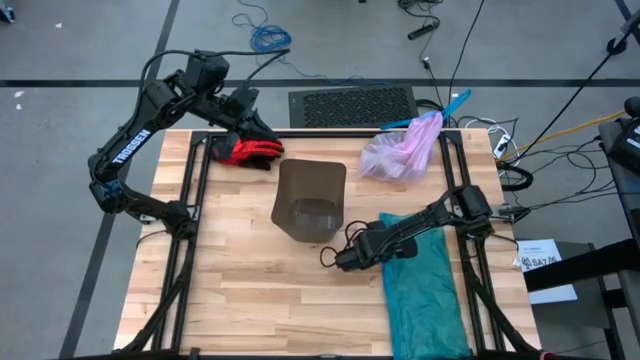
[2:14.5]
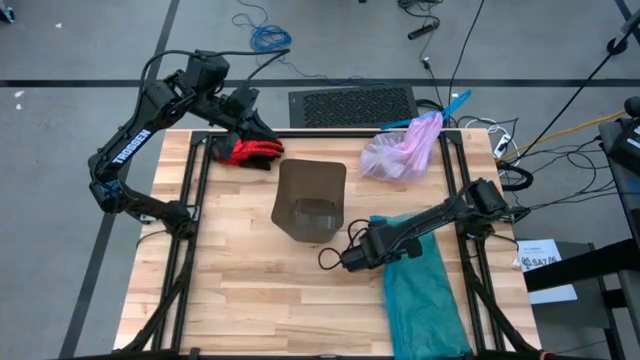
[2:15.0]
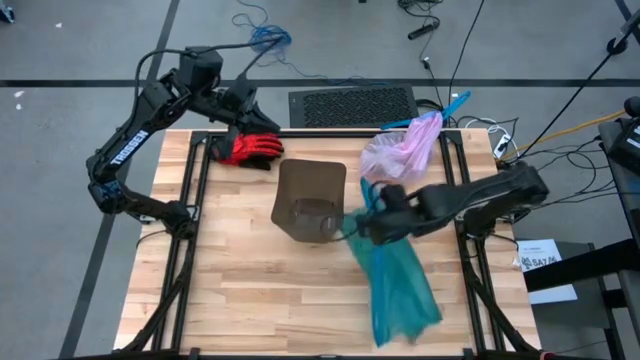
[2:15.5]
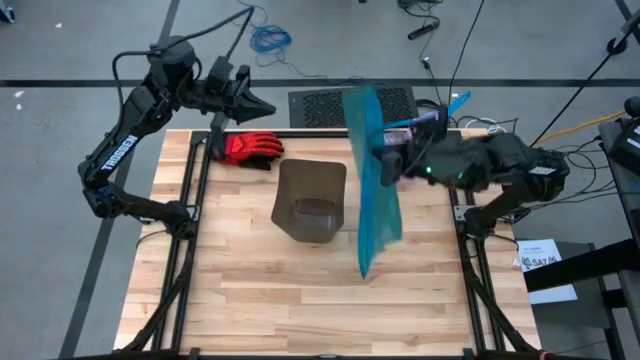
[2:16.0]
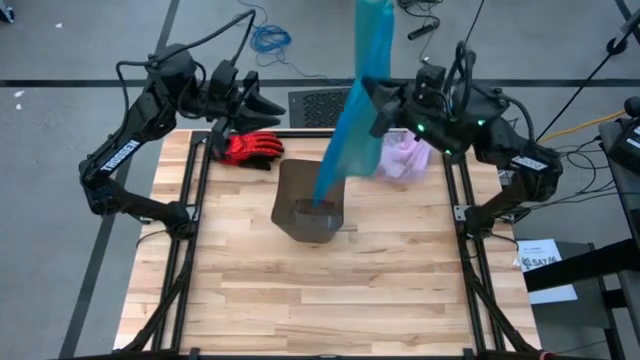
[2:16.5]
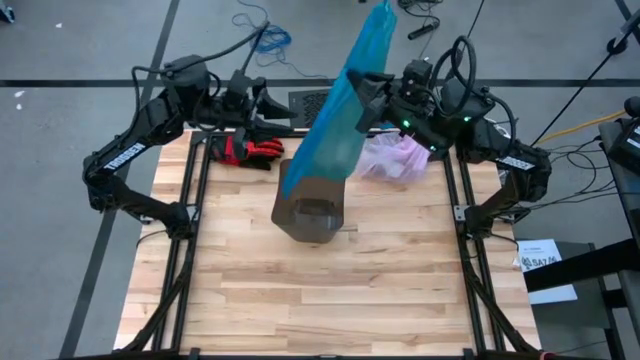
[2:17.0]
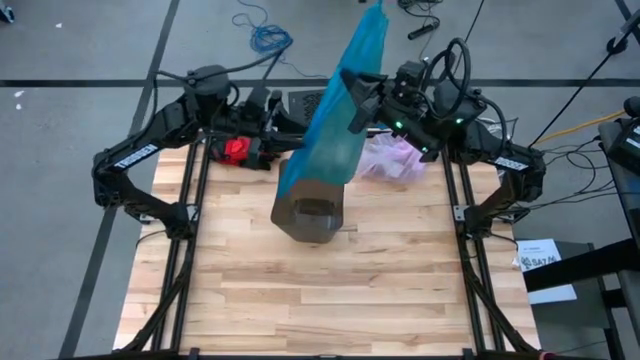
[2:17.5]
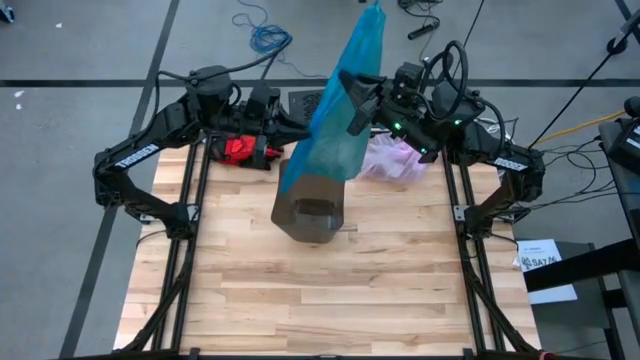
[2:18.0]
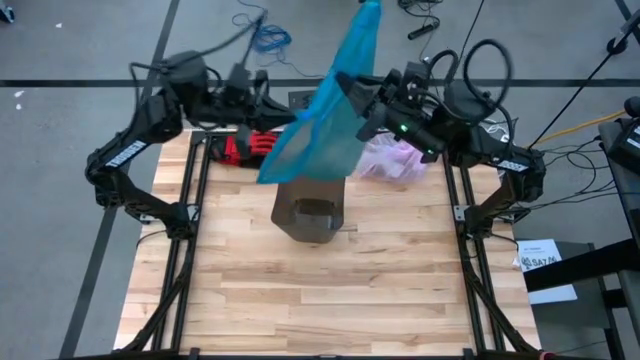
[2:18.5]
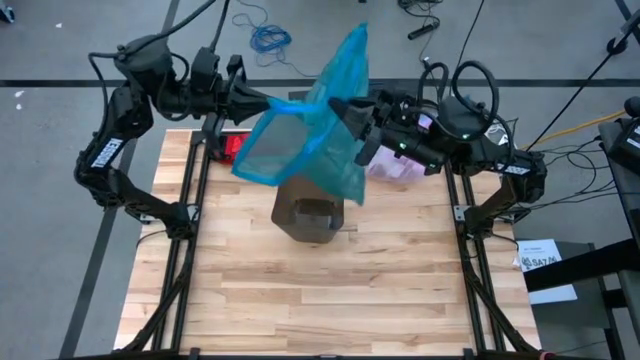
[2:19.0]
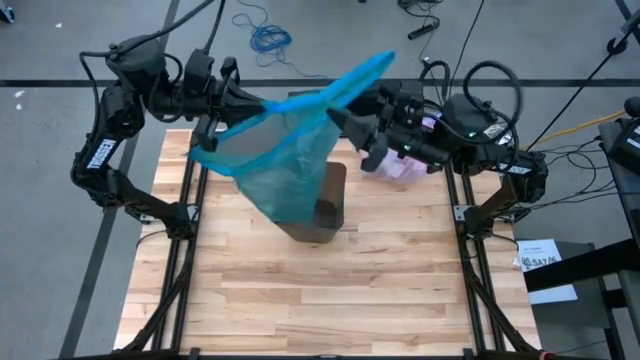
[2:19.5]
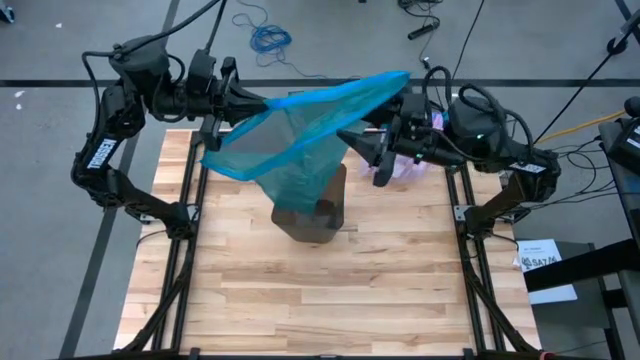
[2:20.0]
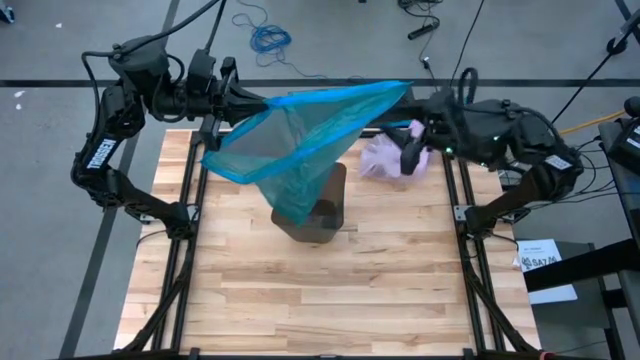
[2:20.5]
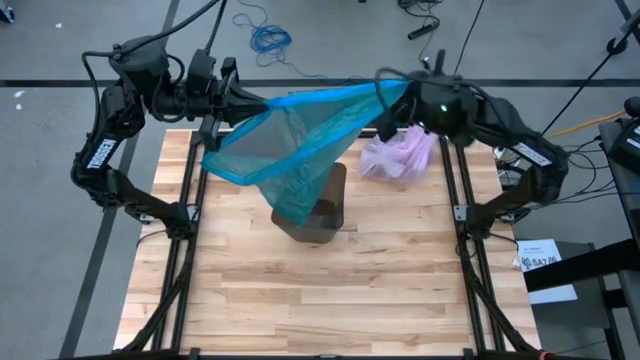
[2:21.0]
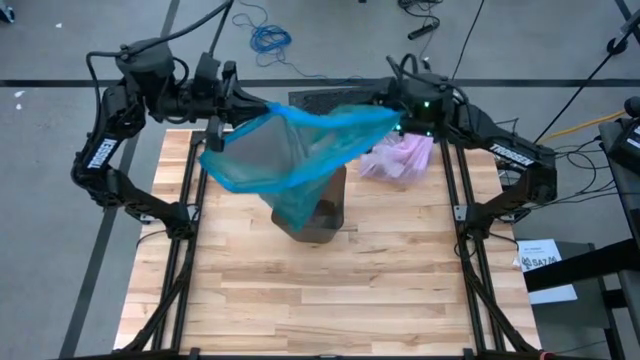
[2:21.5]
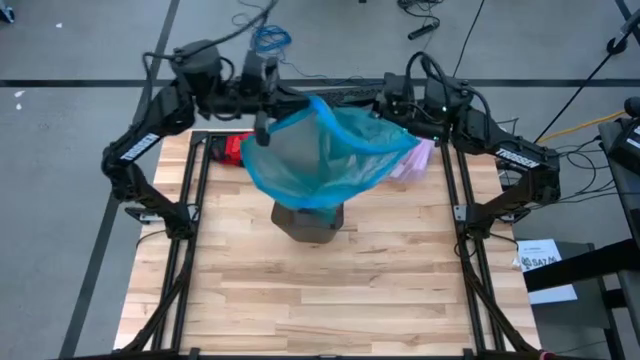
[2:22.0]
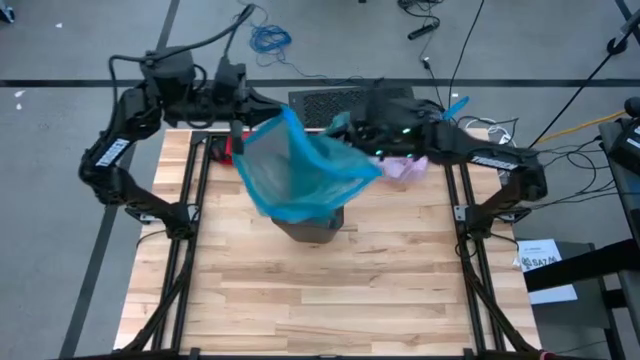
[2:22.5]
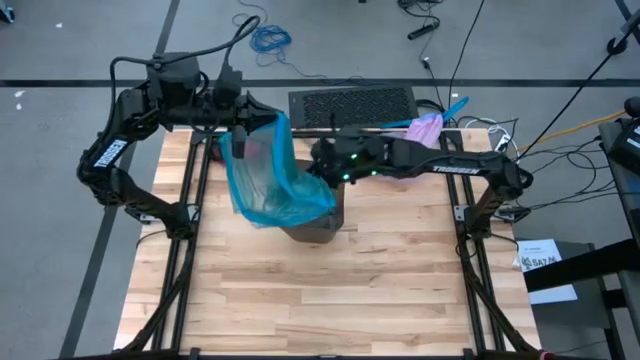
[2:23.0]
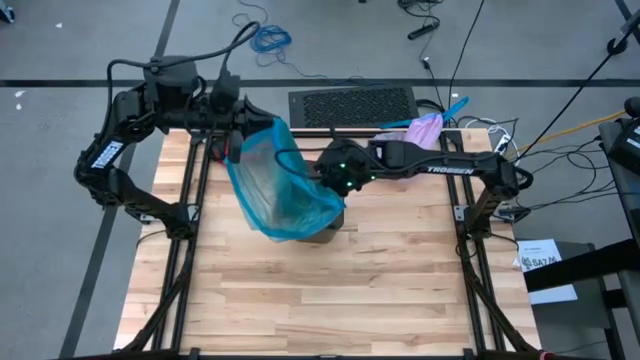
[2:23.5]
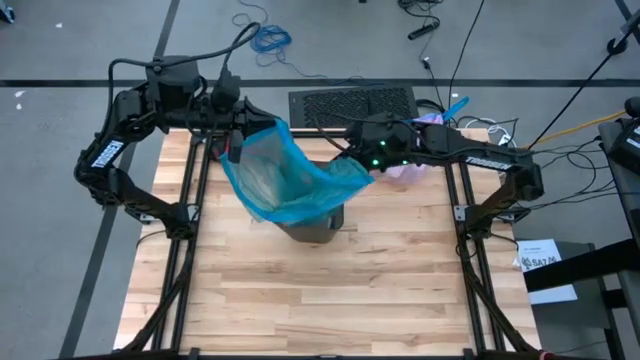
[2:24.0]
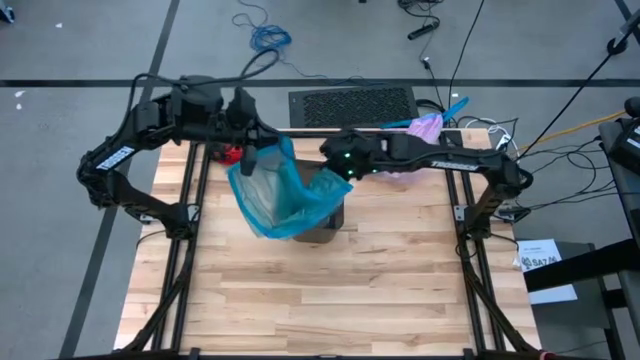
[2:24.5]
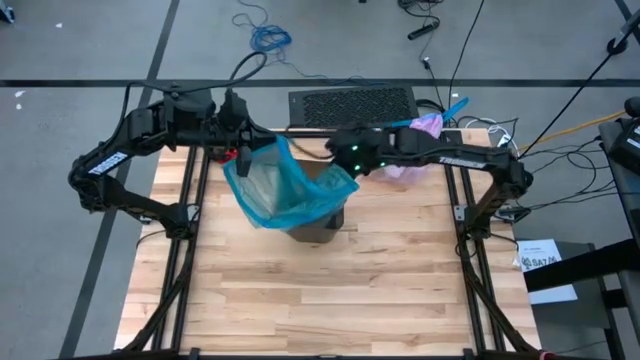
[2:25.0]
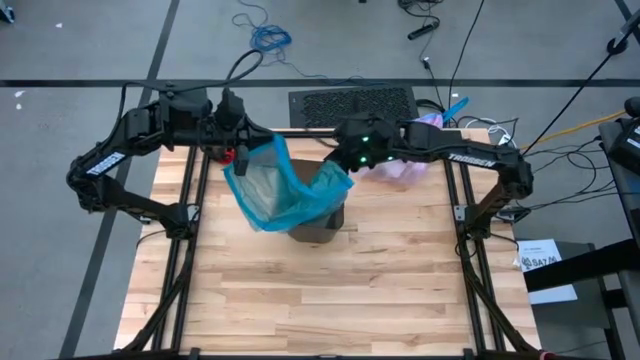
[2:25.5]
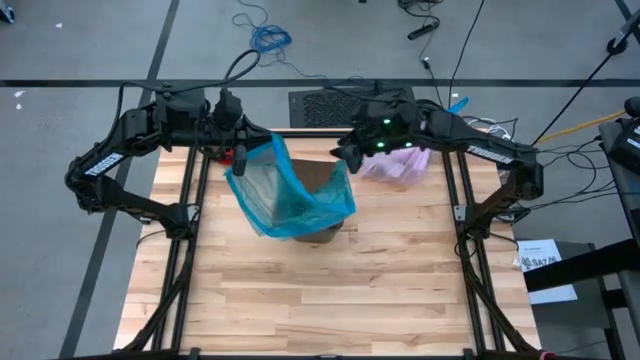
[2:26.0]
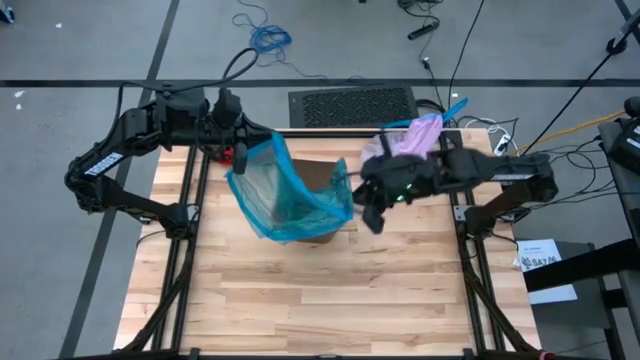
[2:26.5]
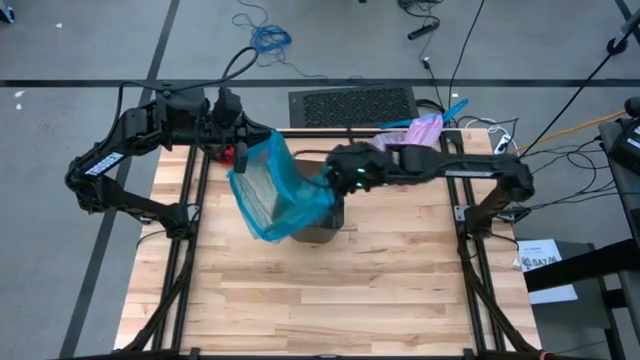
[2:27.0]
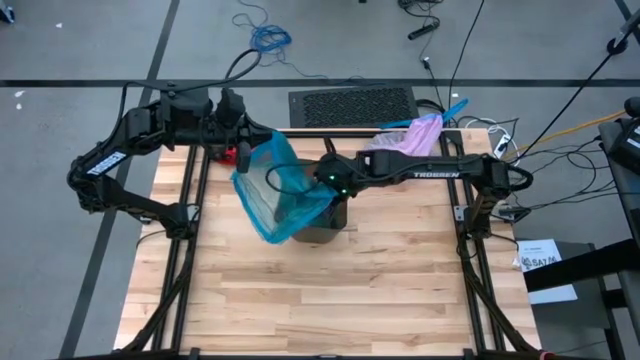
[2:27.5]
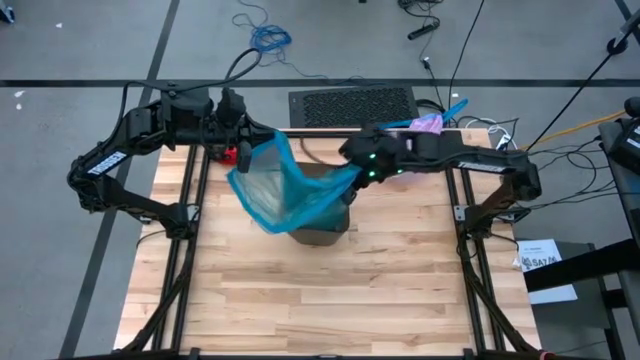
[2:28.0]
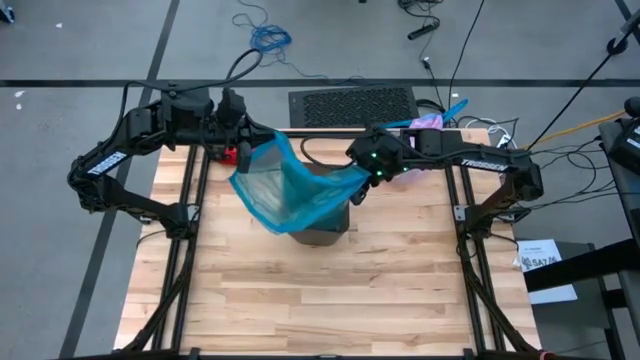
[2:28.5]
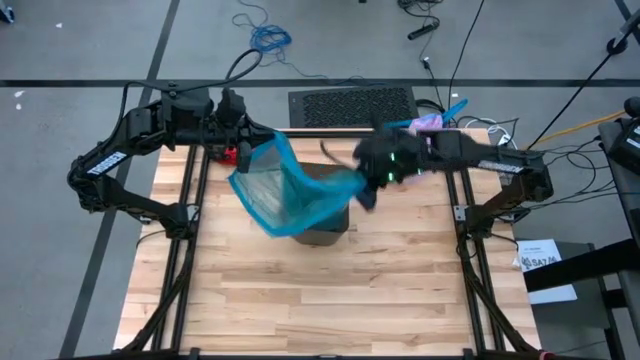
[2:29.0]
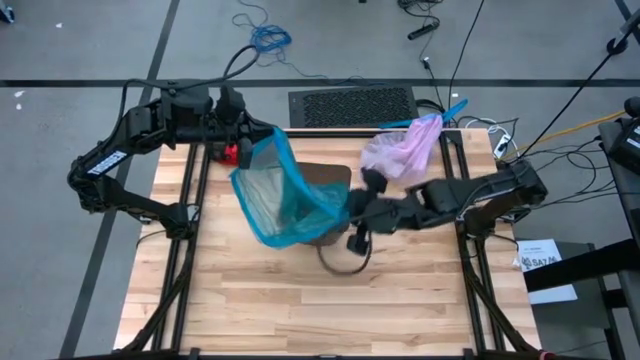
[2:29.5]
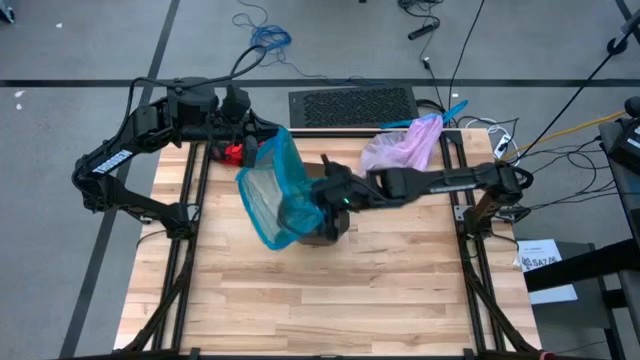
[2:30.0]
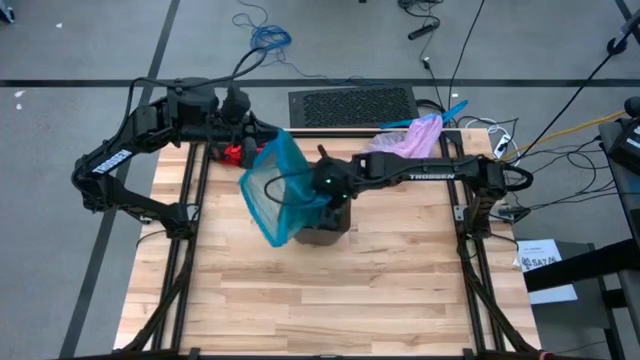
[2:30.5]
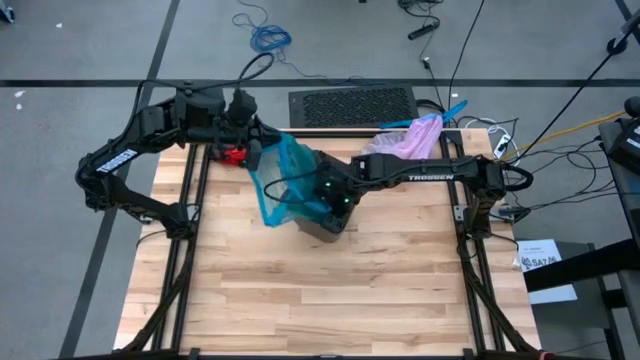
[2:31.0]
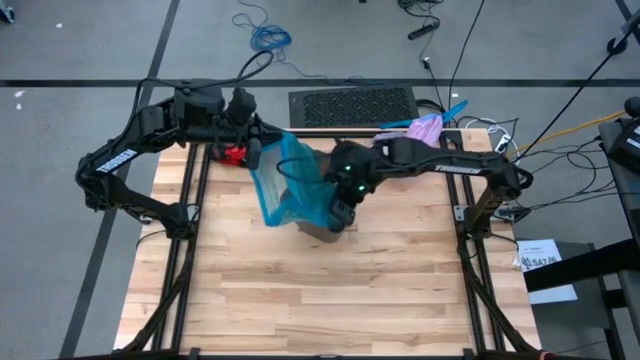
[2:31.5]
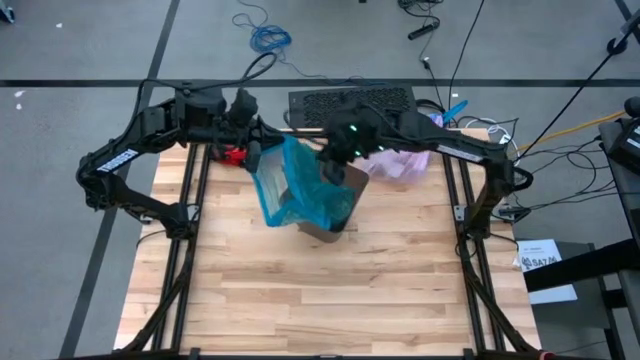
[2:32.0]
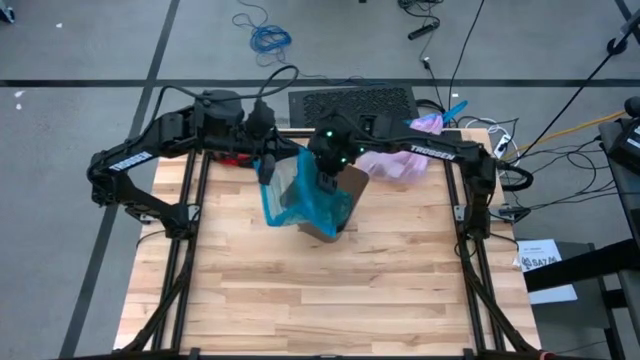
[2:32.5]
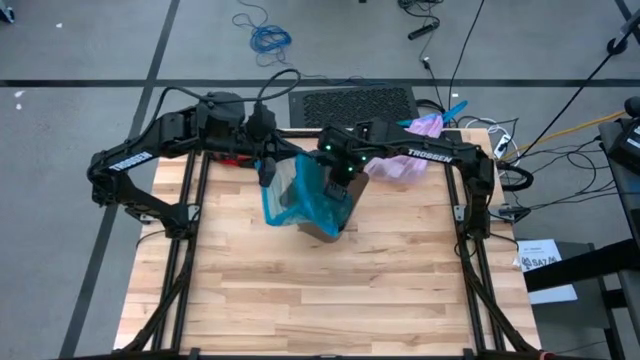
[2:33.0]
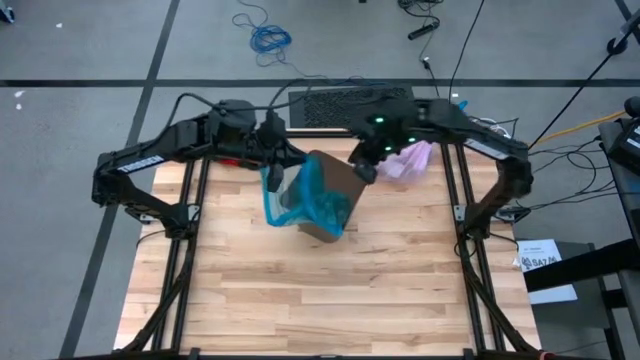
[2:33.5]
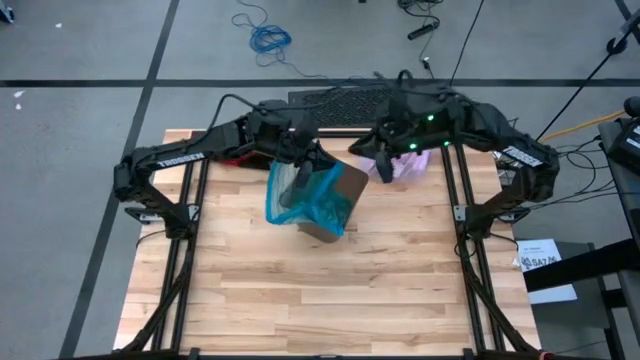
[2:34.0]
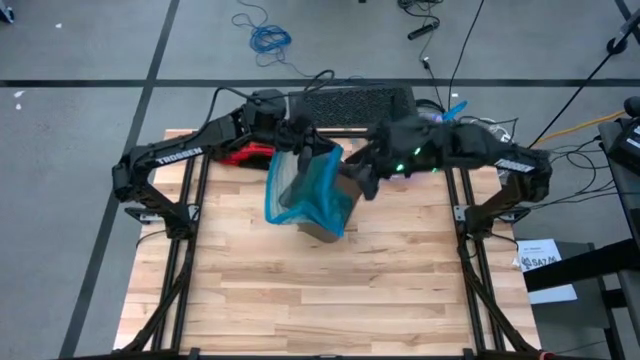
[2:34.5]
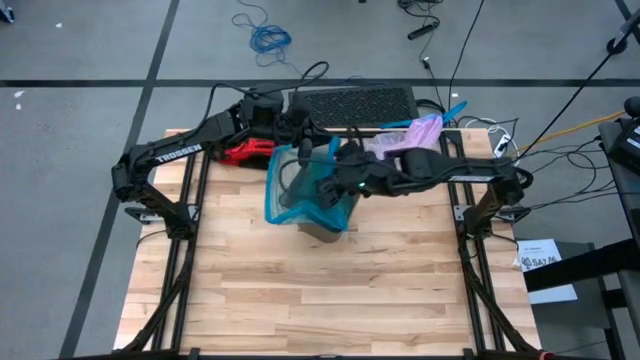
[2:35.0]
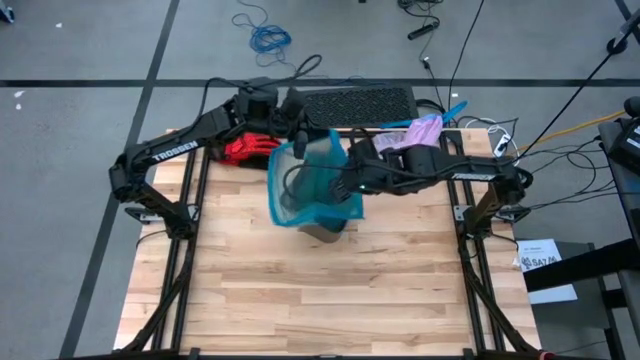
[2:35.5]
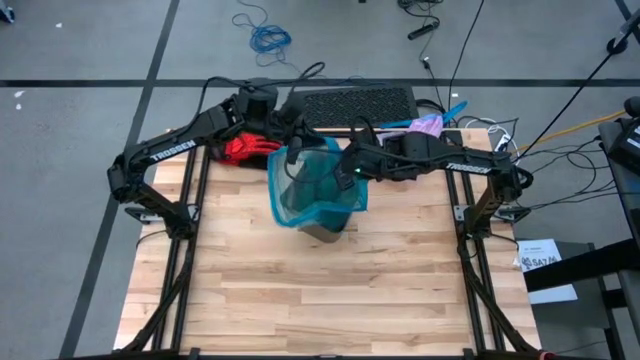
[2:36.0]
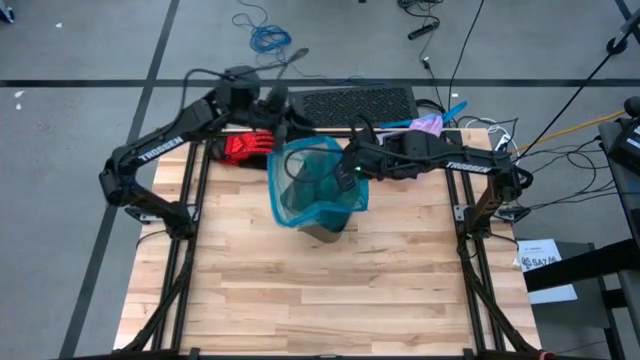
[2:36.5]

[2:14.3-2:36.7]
Task: place trash/remove bag and relplace
Insert the new blue trash bag into the trash bin
